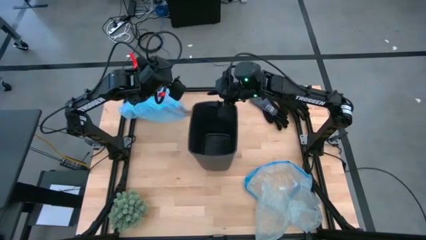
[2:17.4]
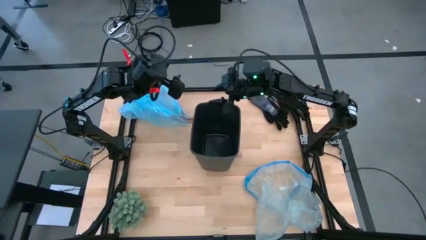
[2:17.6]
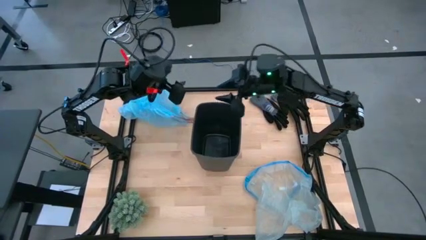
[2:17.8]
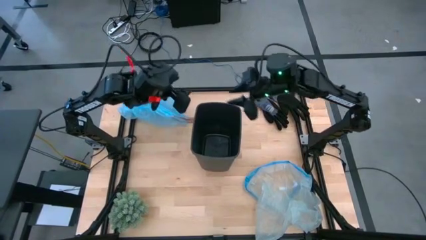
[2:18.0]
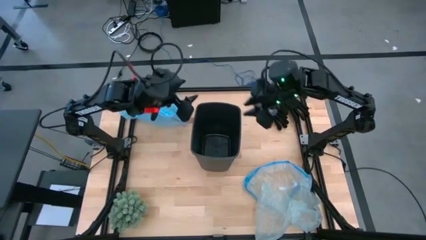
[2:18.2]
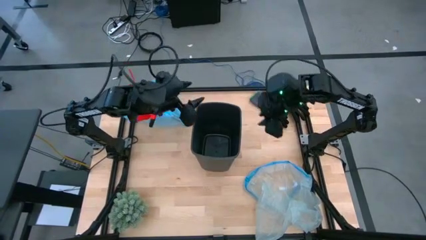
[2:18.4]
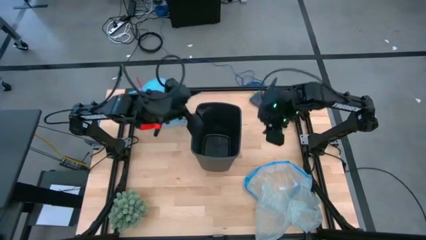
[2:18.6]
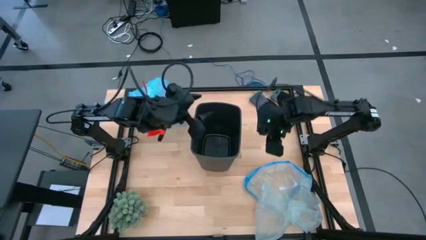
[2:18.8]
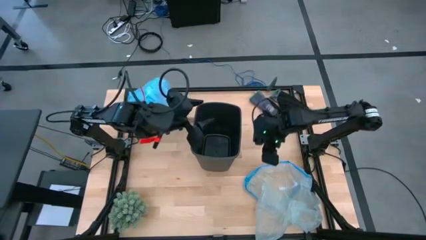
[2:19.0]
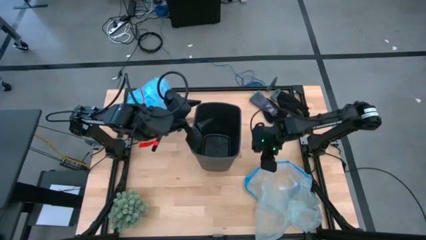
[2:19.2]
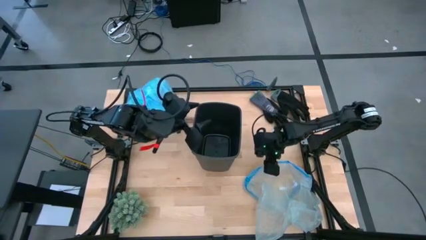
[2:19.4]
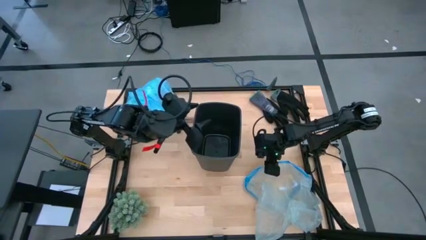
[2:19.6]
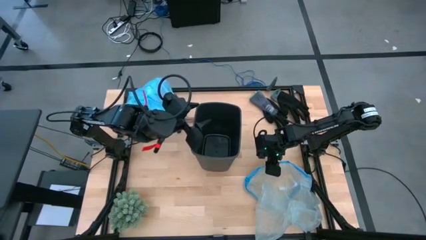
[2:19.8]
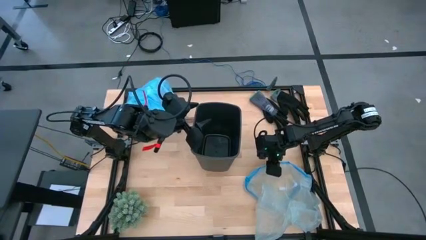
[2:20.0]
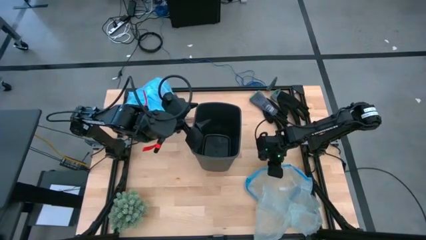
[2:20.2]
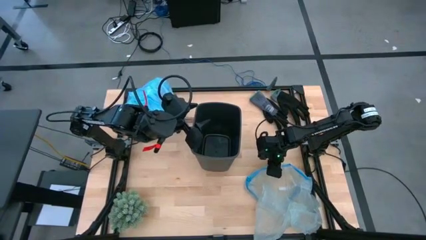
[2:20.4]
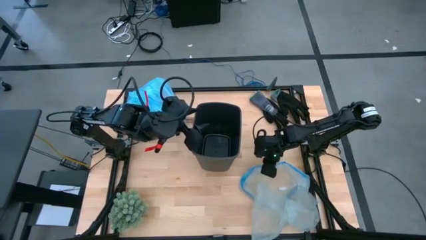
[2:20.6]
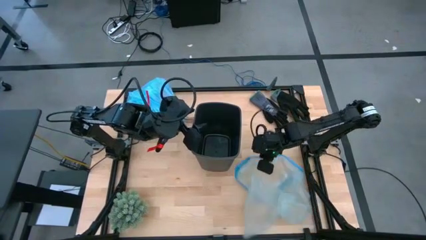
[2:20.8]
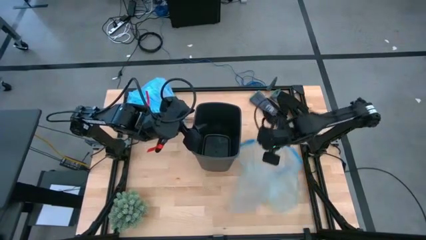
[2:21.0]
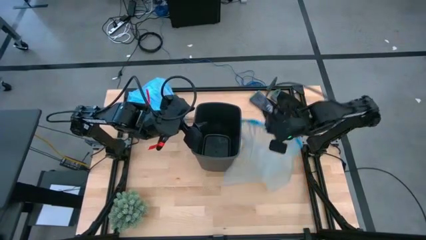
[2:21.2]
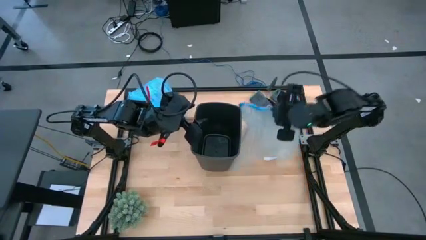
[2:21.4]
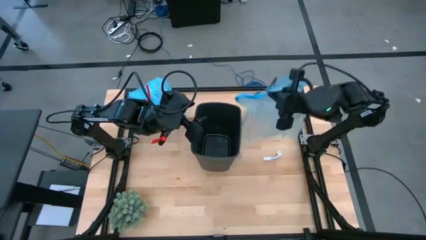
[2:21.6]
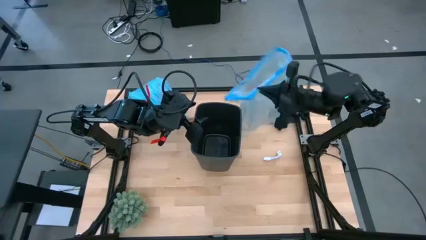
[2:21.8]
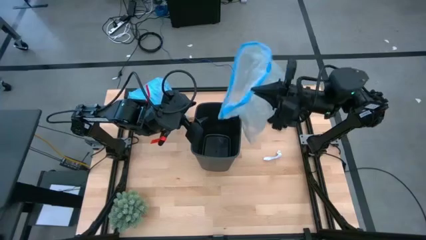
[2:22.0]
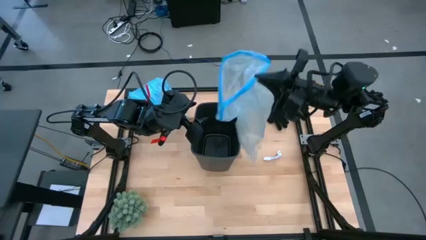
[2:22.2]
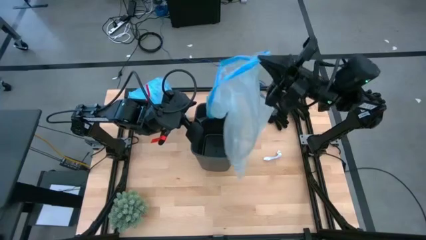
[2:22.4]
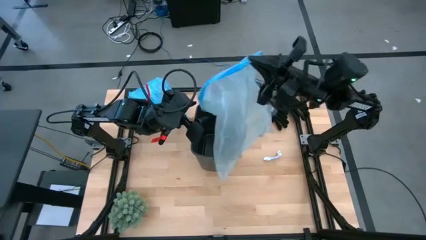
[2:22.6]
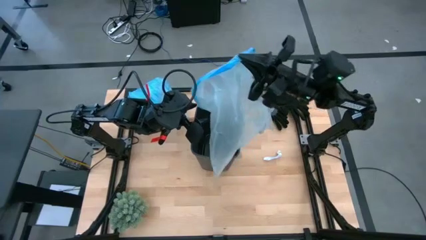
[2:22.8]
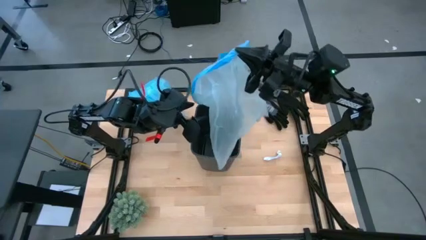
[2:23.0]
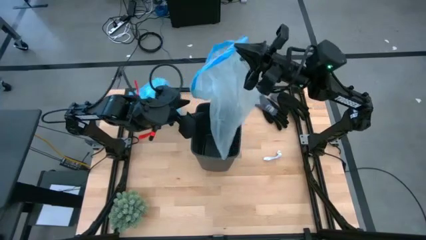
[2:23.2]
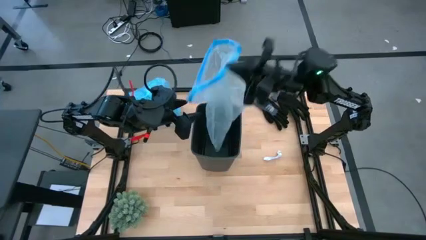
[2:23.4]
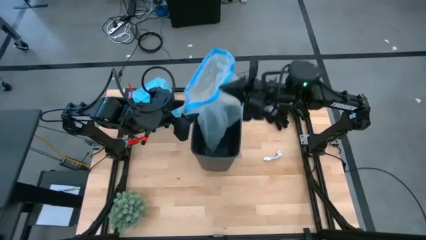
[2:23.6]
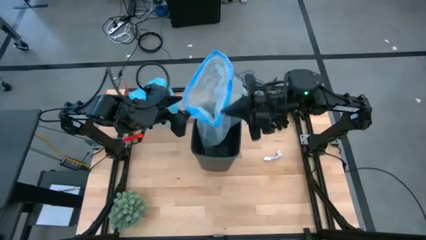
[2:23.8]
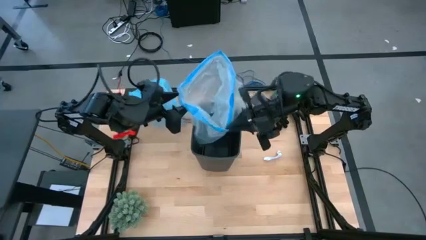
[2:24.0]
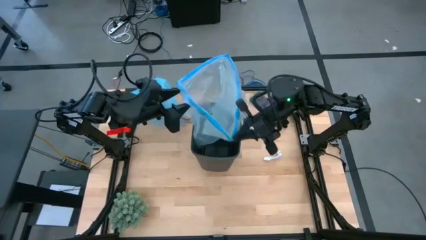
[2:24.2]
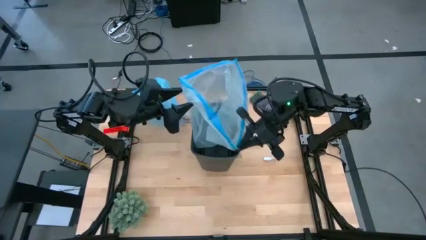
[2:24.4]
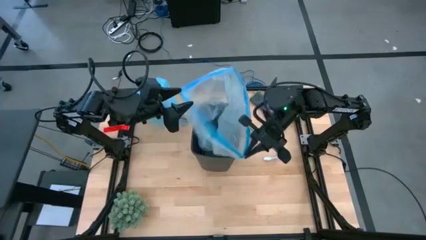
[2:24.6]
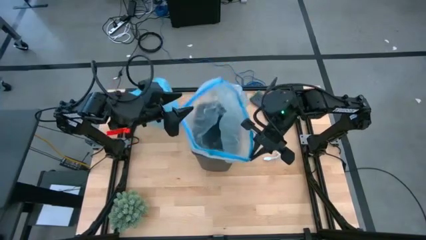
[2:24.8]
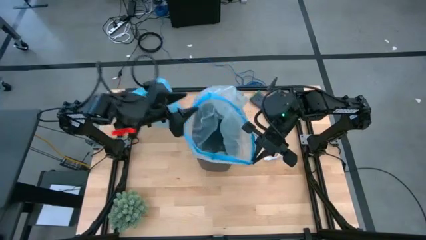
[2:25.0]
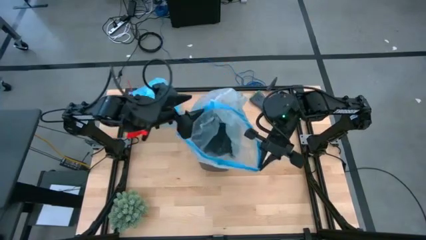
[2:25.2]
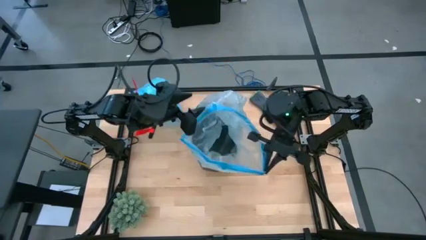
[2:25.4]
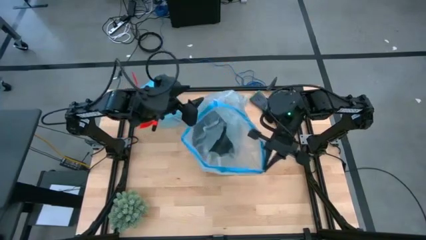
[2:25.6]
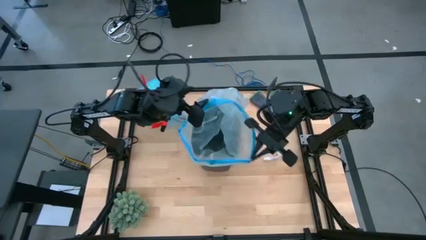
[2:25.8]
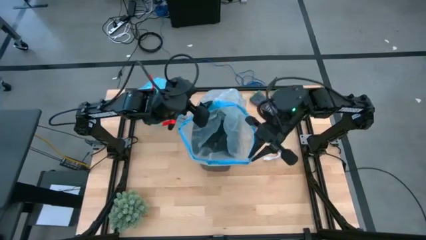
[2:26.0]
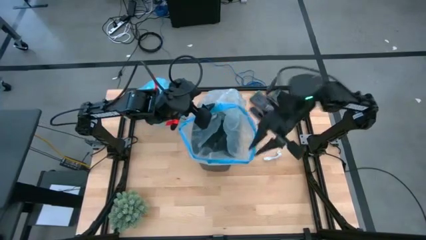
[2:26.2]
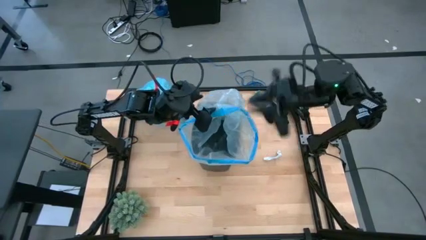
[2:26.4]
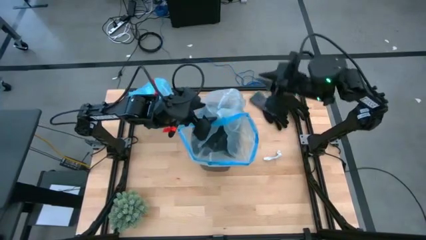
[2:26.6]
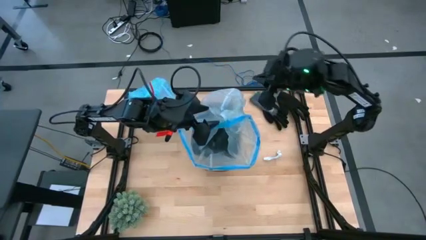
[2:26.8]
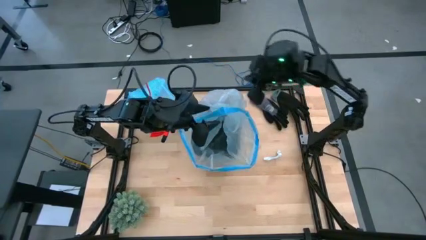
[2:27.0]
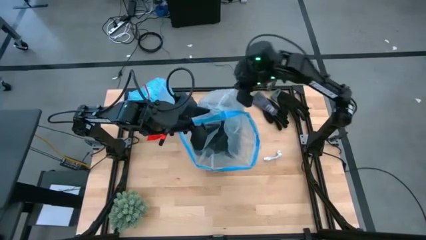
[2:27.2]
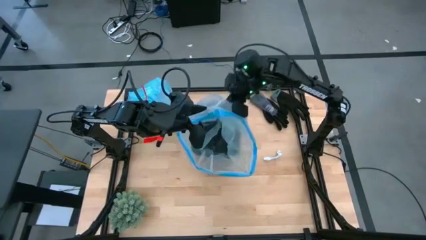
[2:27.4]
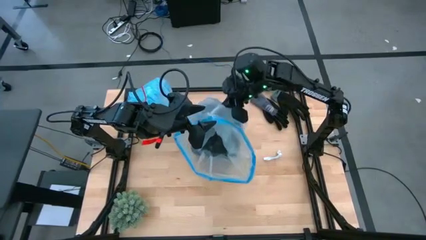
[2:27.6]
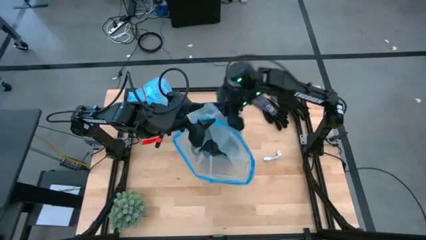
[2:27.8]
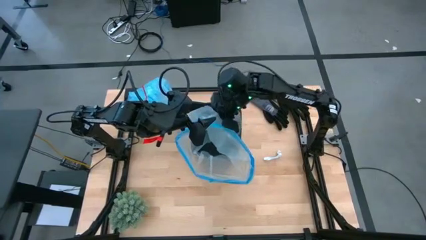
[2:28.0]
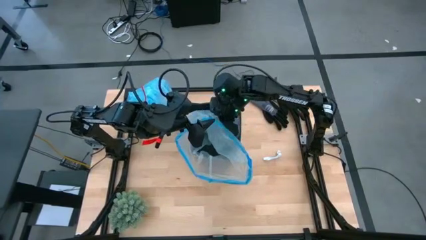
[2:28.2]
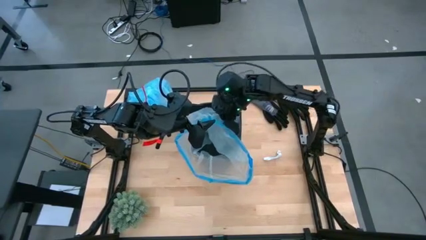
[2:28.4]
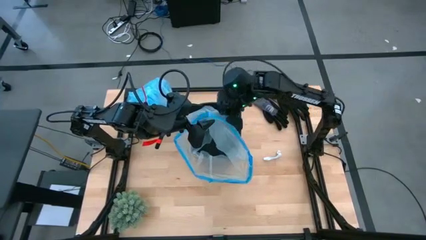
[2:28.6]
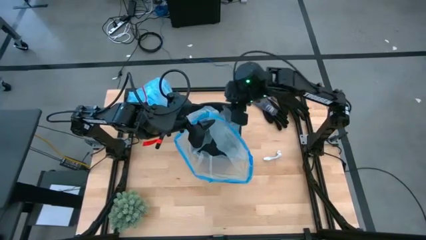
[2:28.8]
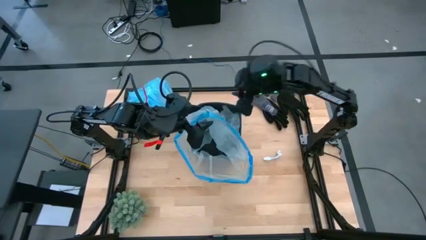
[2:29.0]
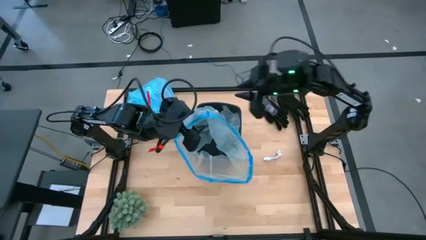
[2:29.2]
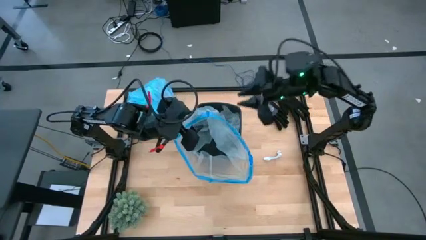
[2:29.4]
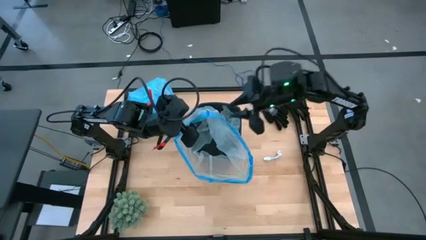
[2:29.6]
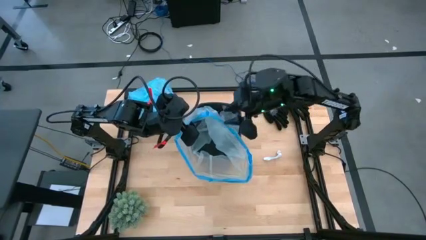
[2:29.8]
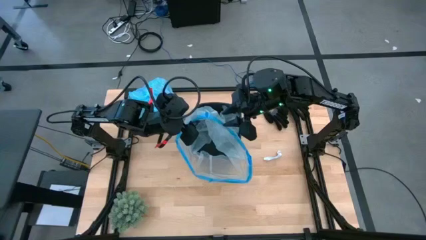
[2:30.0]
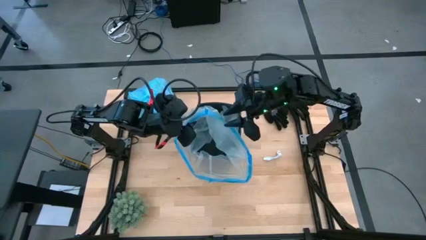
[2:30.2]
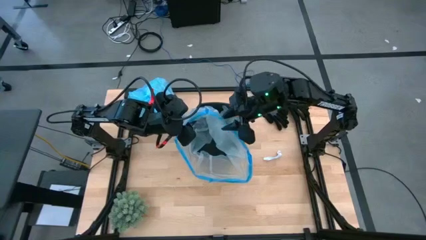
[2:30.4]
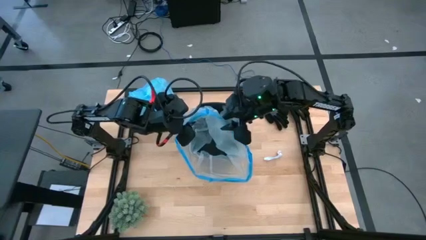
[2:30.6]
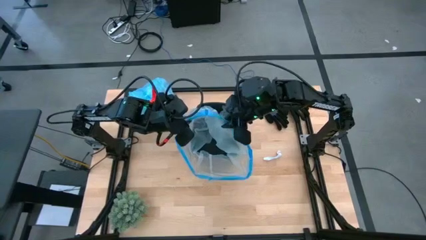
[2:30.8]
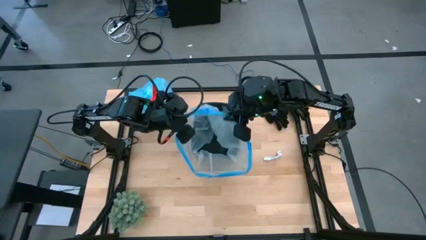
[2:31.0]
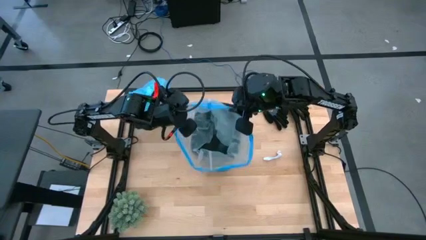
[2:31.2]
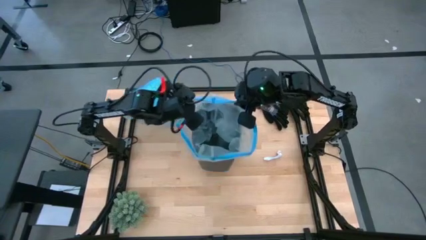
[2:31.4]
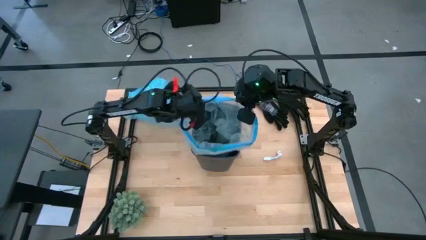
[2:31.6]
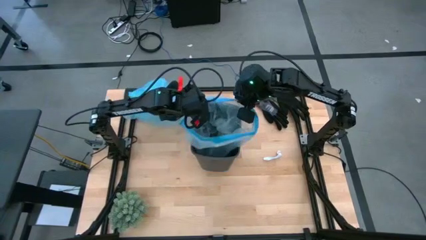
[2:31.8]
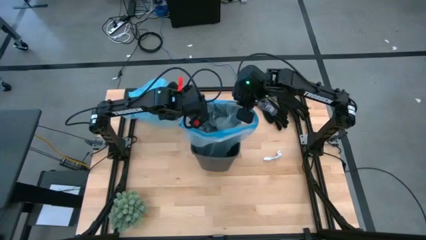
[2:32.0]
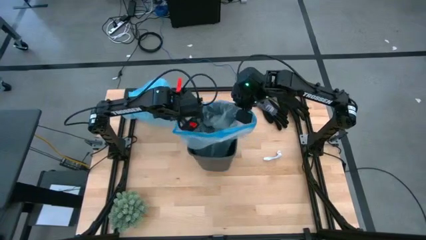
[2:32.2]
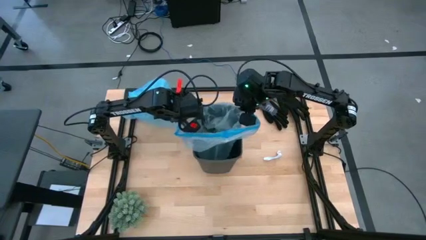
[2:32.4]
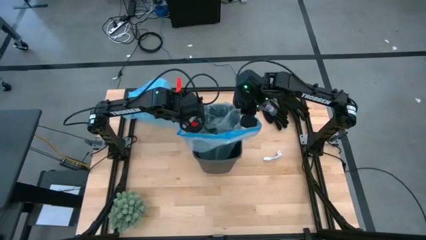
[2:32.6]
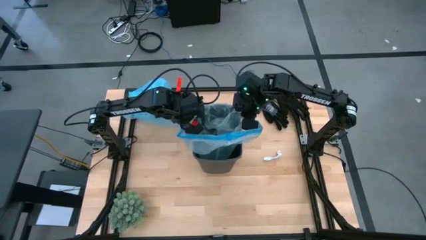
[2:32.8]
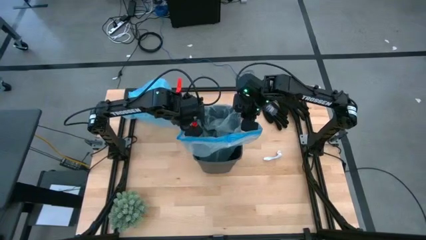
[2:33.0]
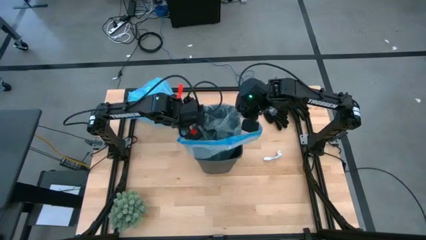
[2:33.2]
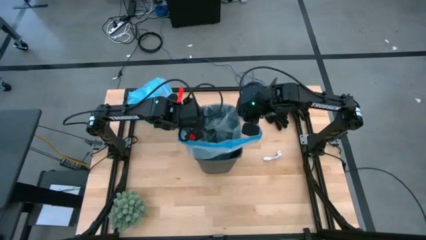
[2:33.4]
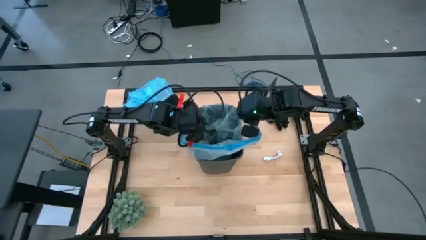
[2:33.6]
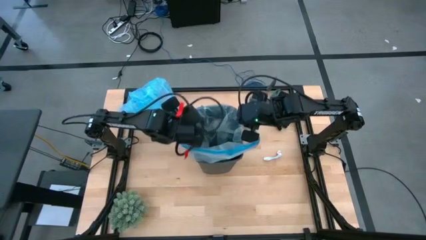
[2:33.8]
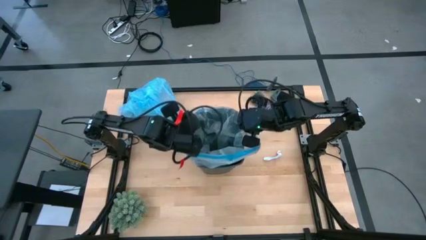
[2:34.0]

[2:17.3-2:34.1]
Task: place trash/remove bag and relplace
Insert a new trash bag into the bin
